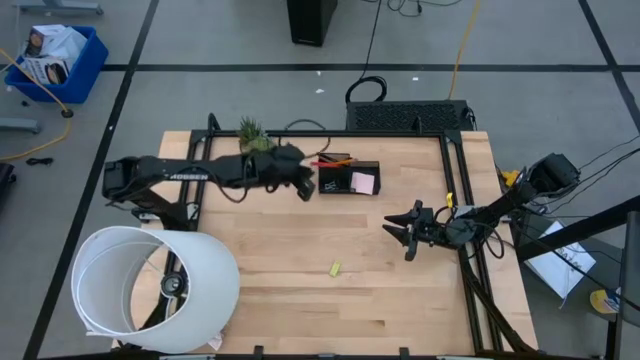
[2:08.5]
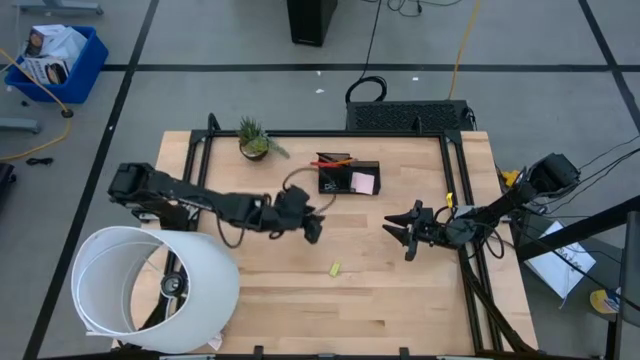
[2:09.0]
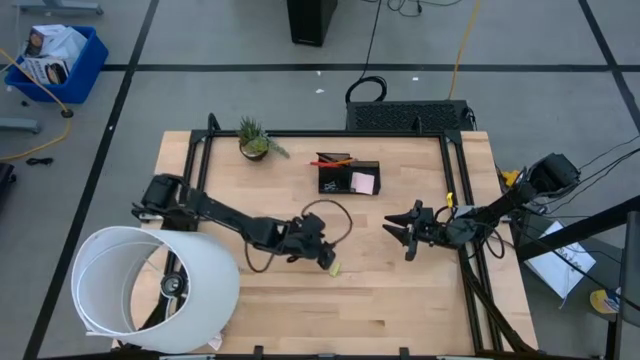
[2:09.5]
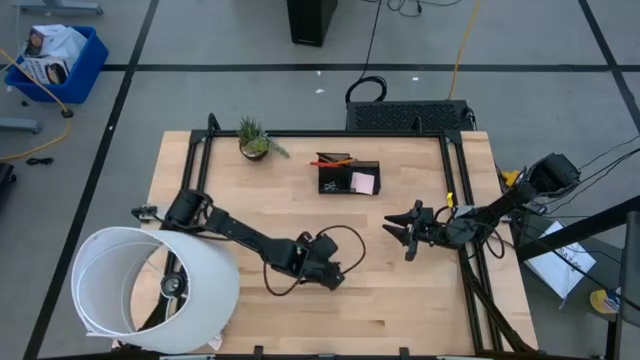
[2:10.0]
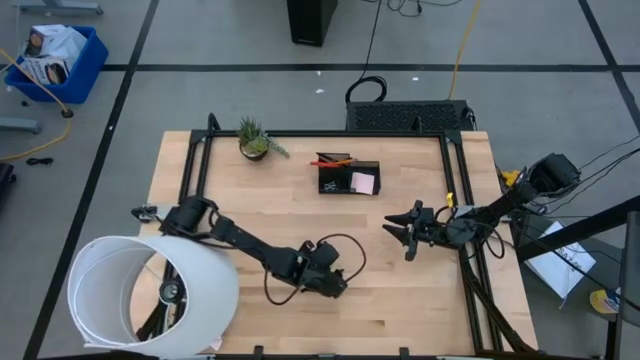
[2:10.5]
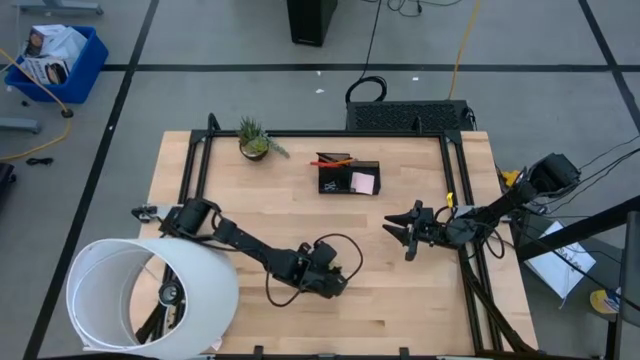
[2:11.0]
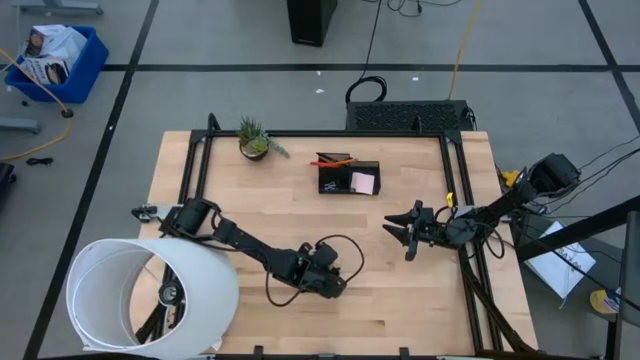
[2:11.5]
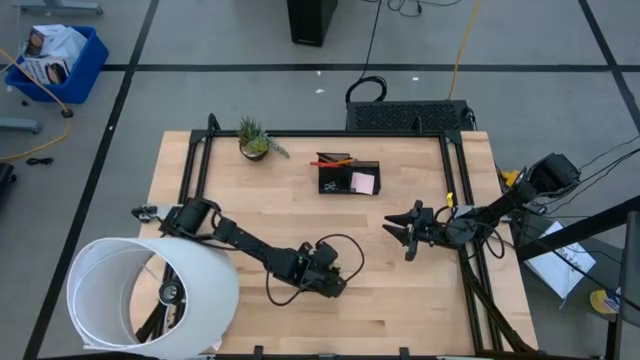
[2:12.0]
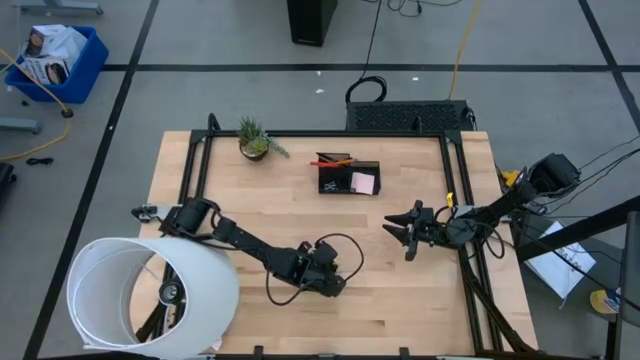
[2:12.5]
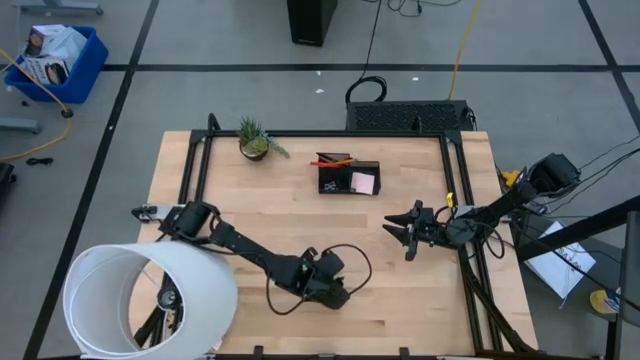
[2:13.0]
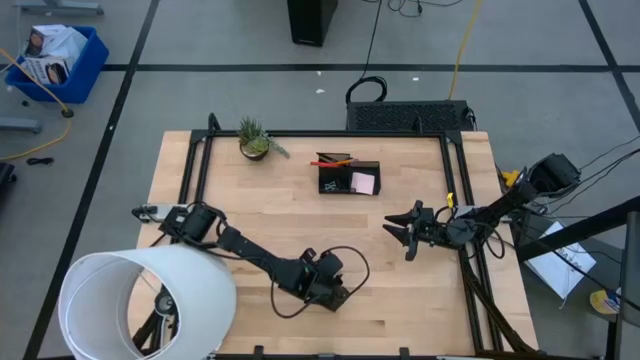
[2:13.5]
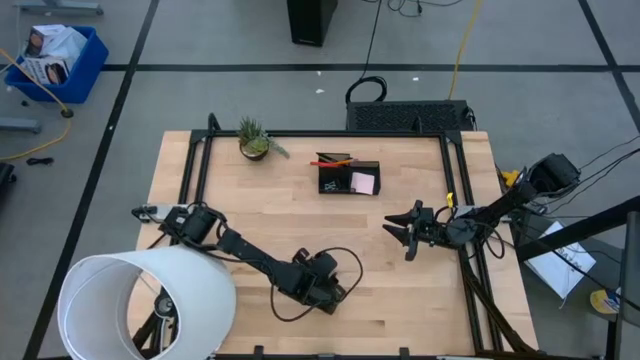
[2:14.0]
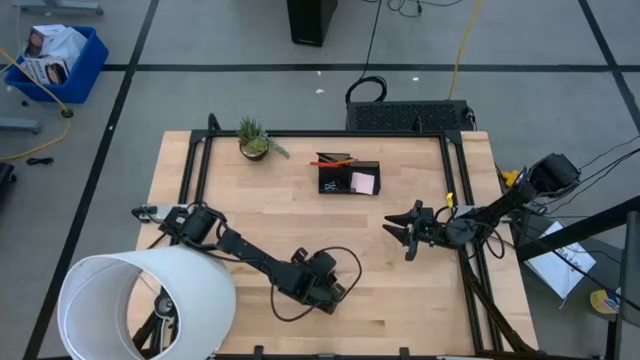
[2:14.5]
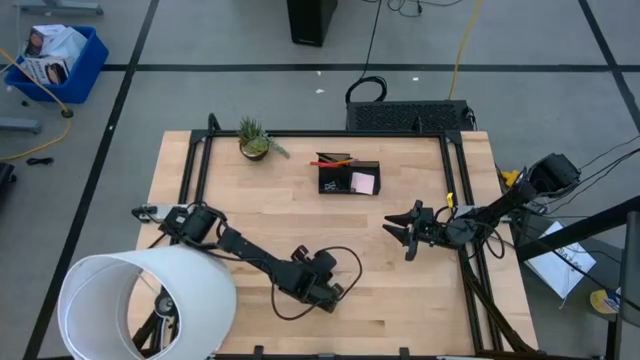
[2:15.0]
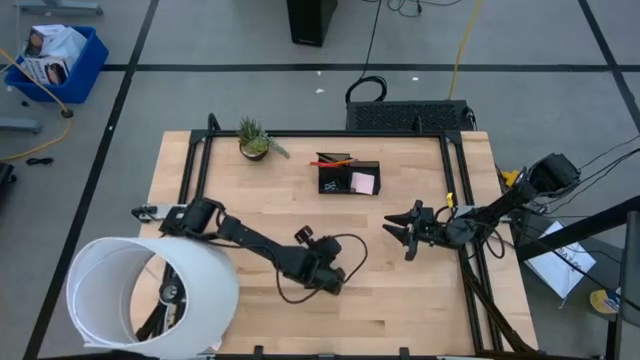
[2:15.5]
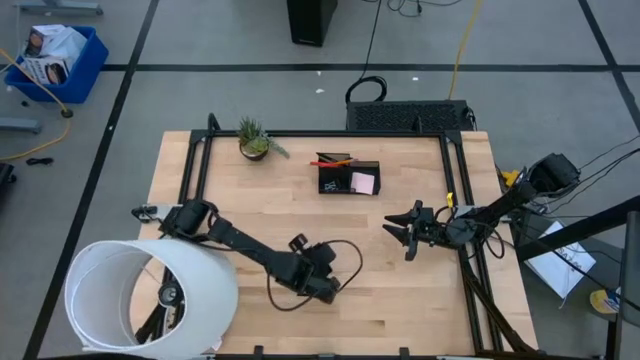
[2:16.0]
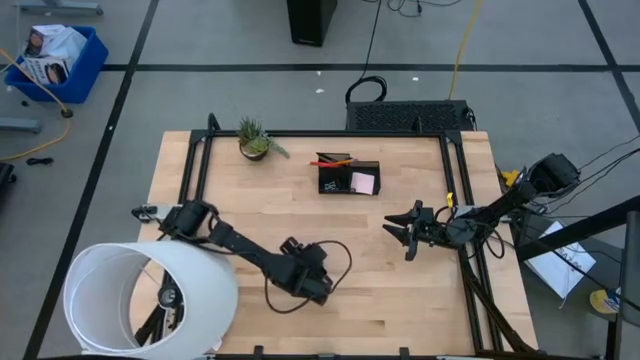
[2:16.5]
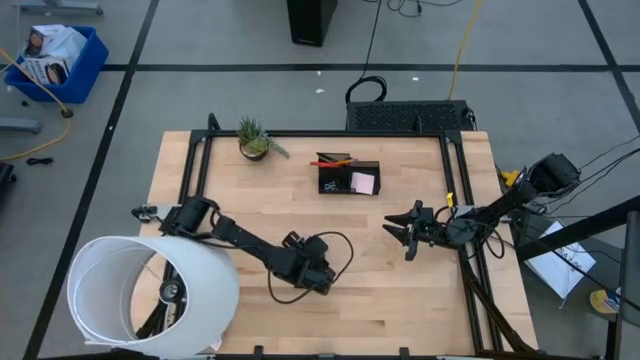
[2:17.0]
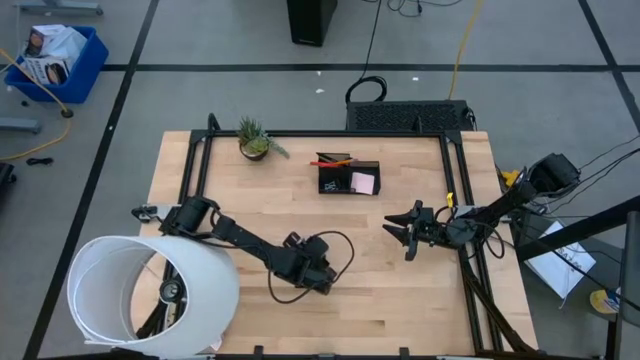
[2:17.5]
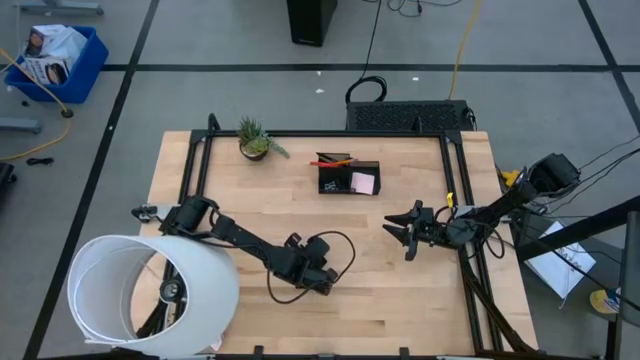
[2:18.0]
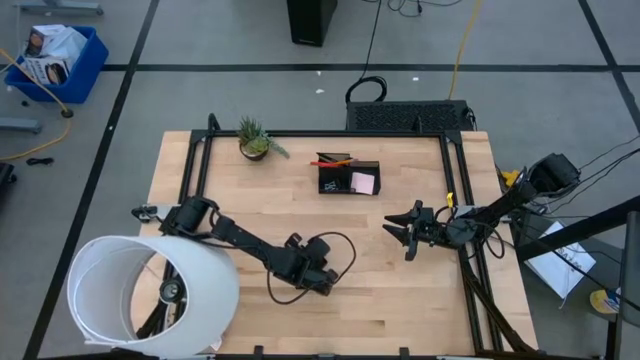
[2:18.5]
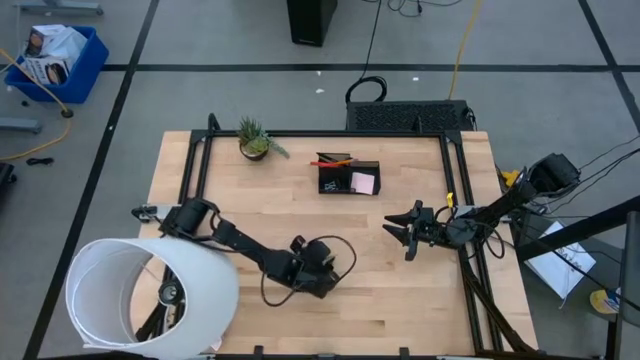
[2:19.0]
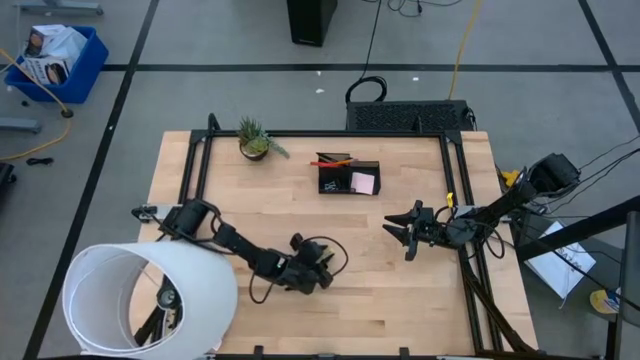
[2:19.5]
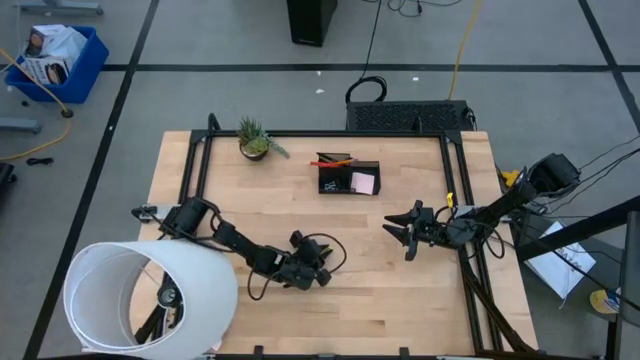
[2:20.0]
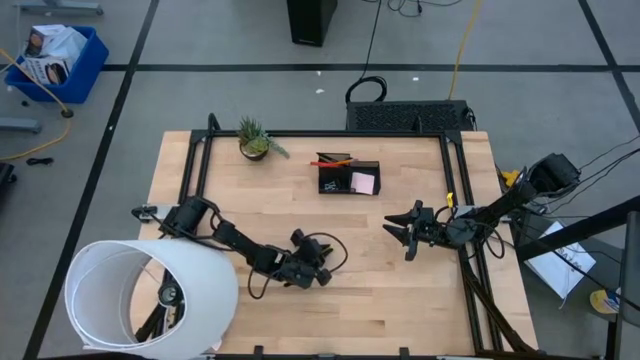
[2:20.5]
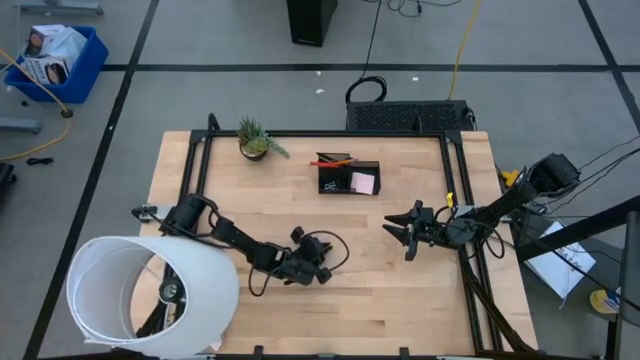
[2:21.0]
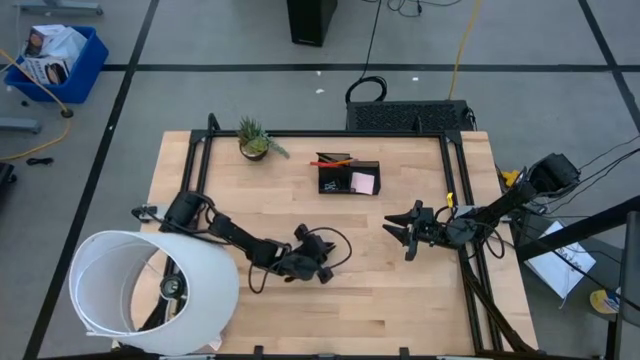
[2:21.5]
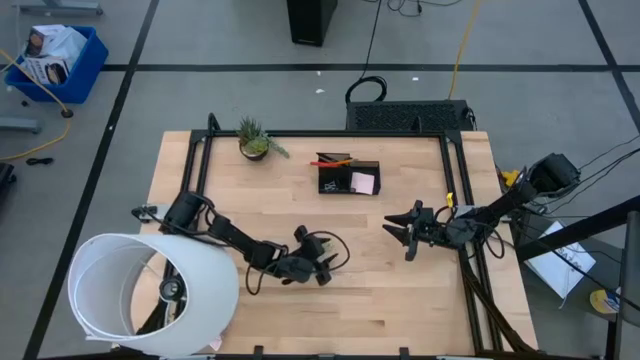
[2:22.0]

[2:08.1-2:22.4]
Task: Pick and place office supplies into organizer
Put the green eraser into the desk organizer

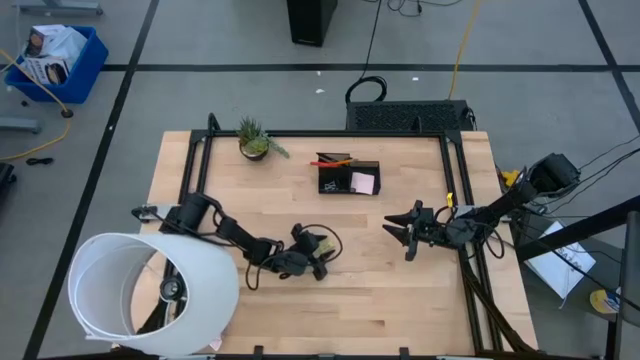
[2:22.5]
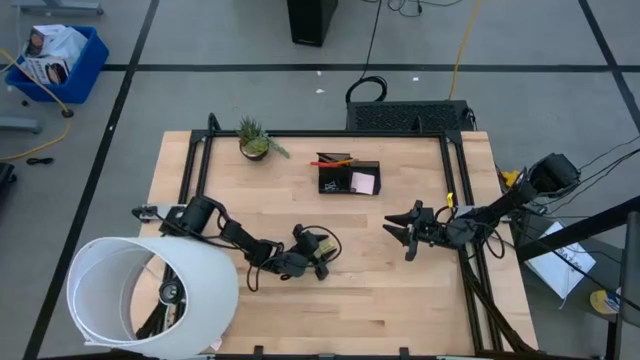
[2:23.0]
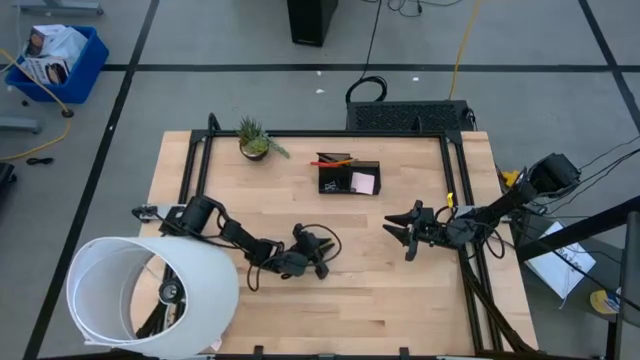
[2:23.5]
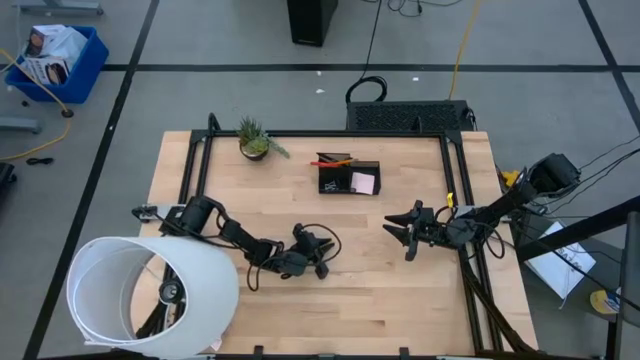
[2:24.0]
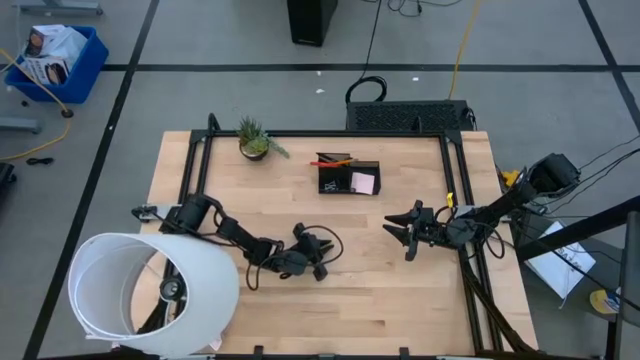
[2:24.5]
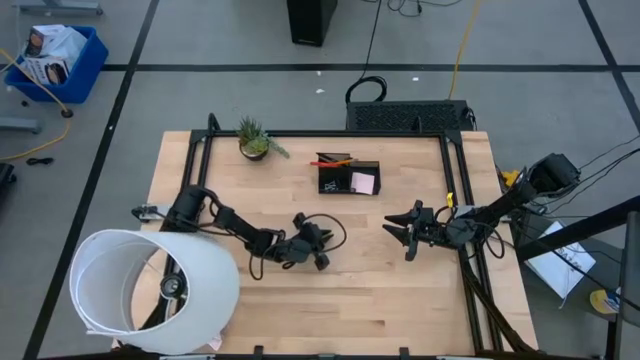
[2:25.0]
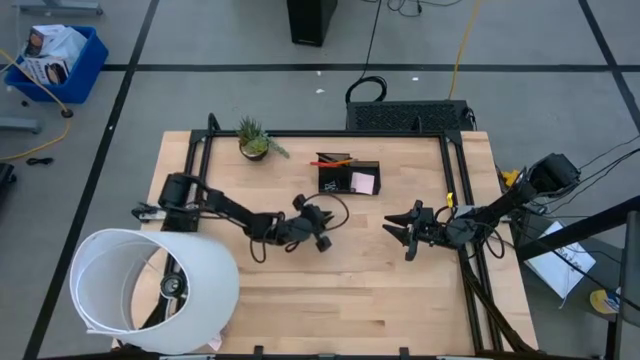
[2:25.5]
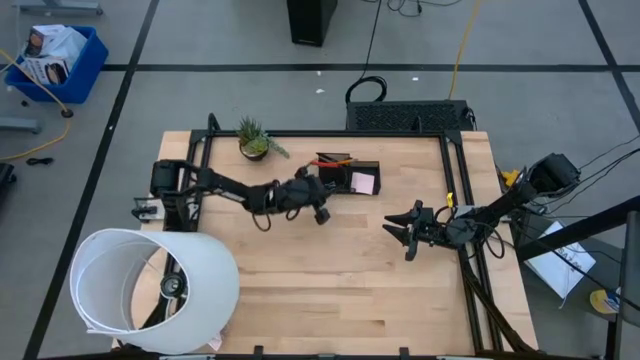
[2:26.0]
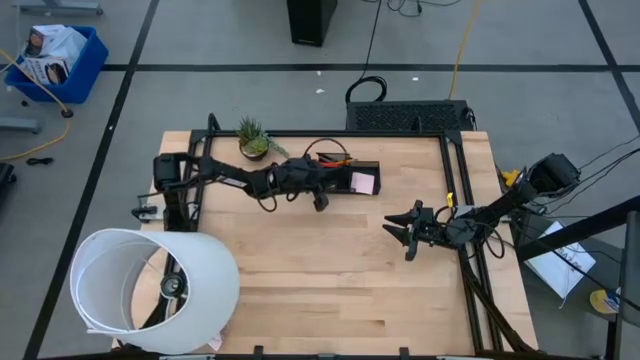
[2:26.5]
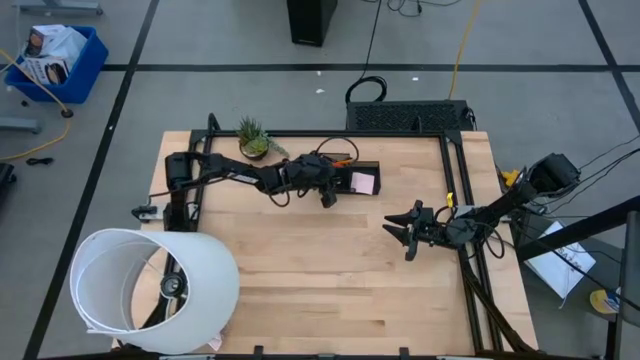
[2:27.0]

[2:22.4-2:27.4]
Put the green eraser into the desk organizer
